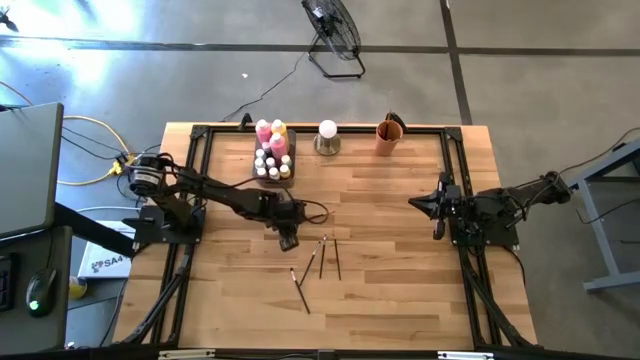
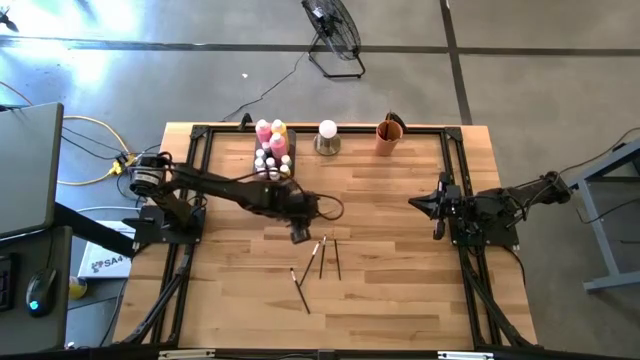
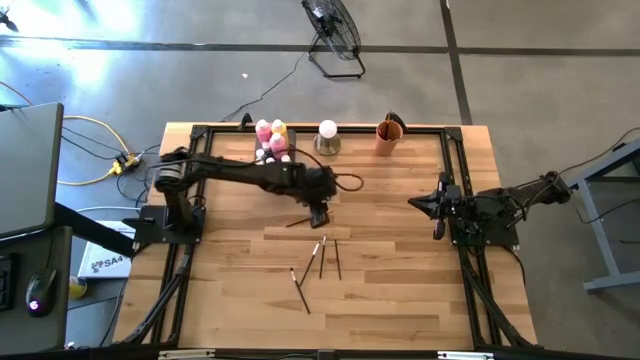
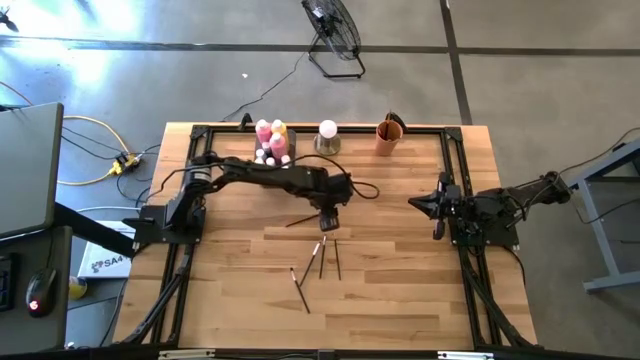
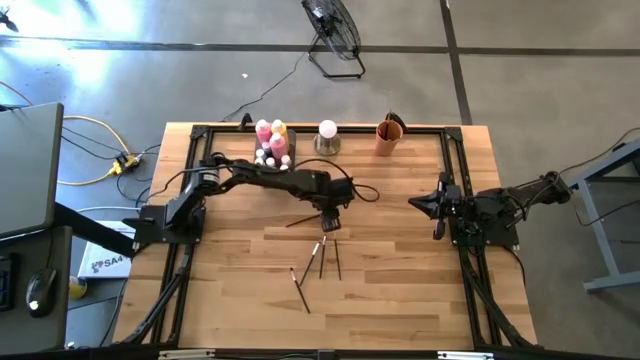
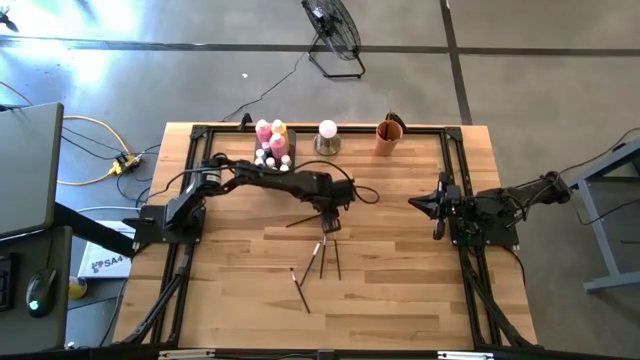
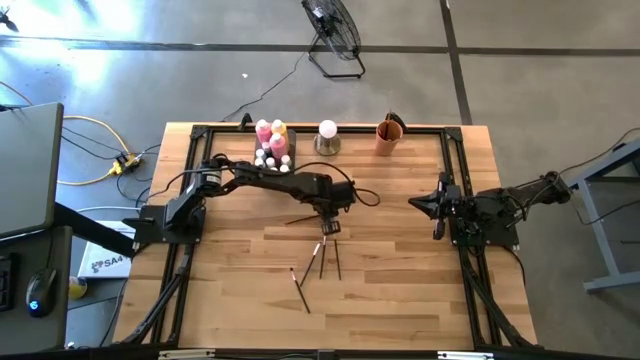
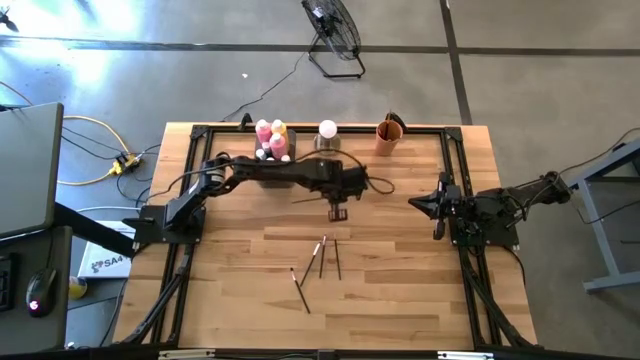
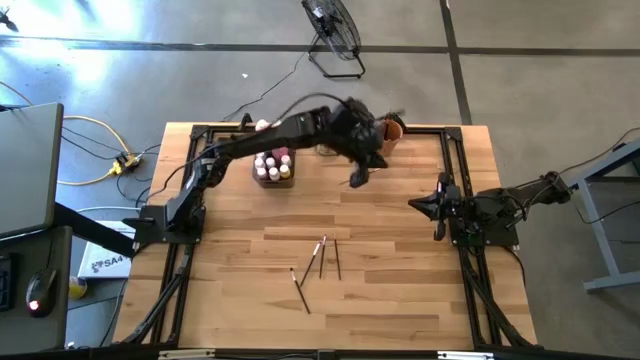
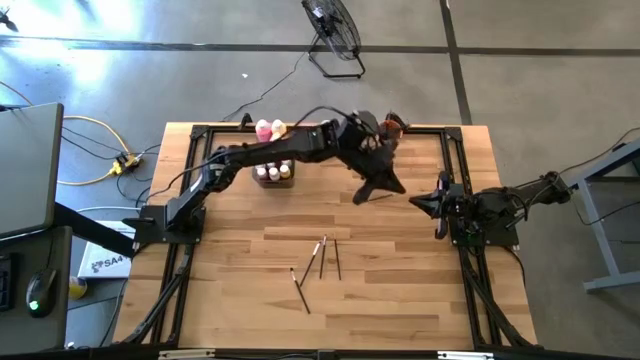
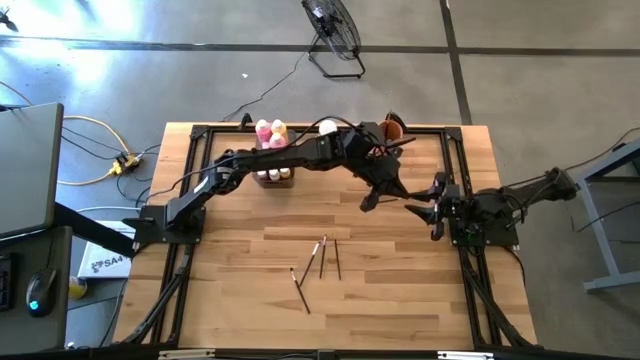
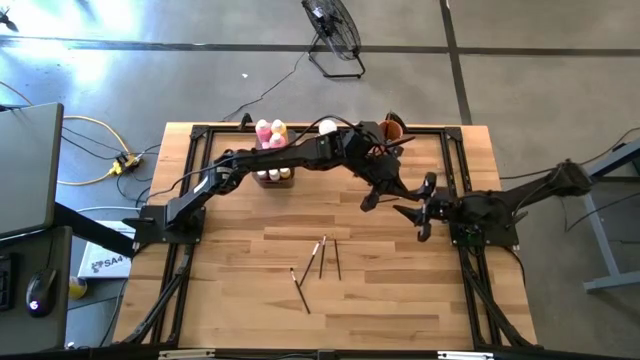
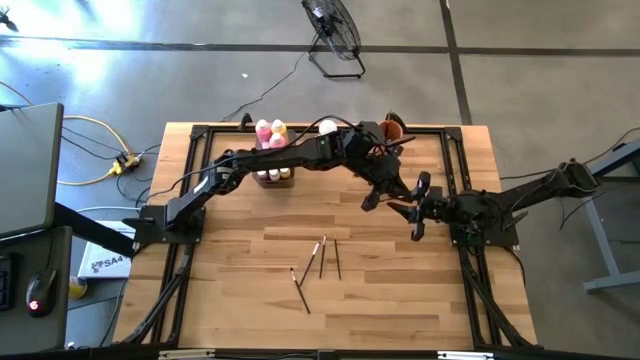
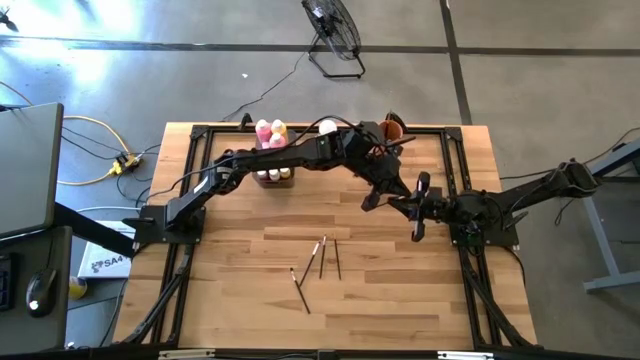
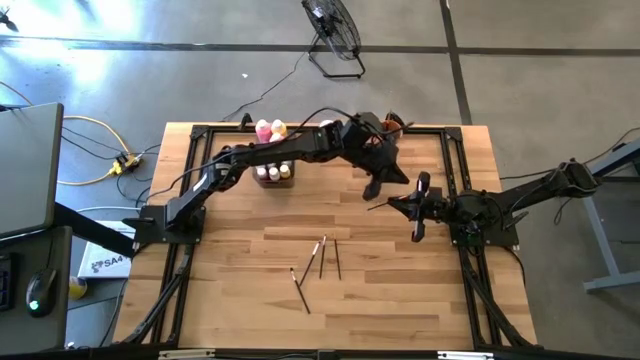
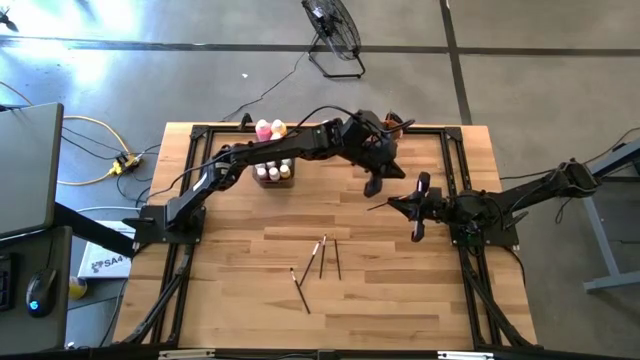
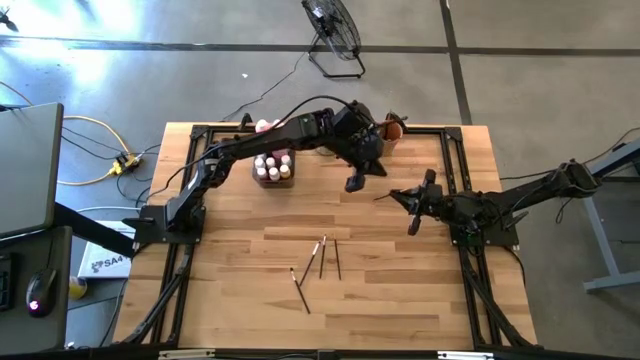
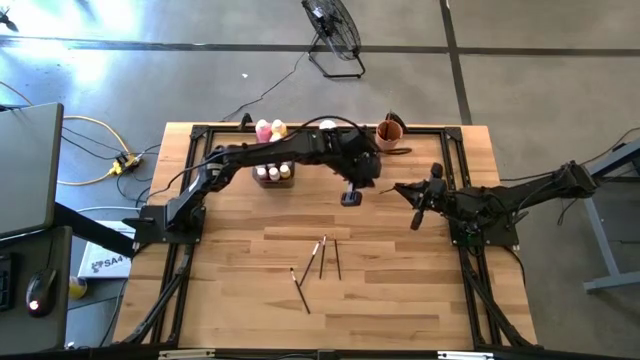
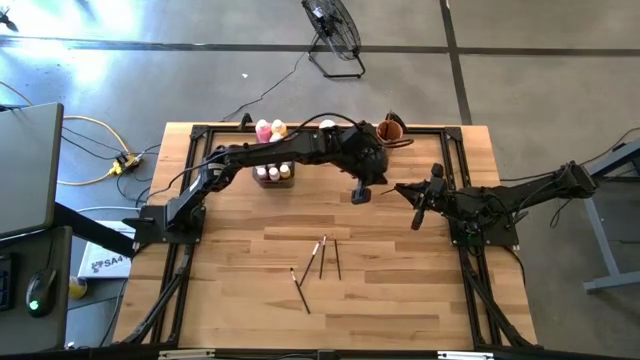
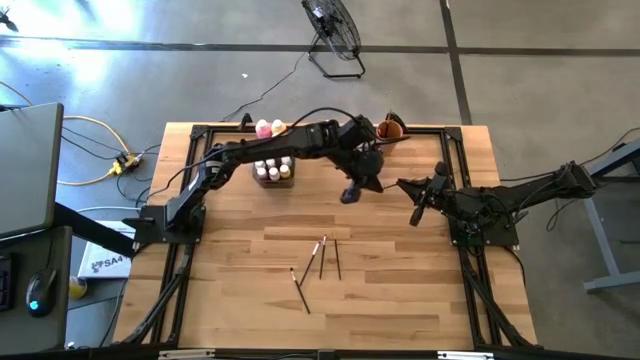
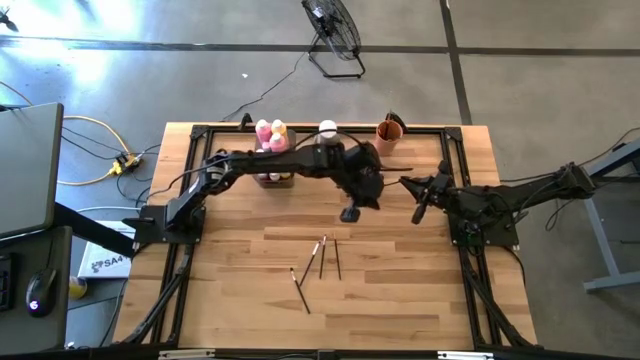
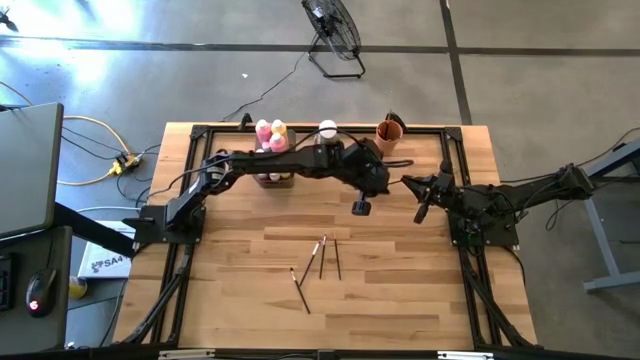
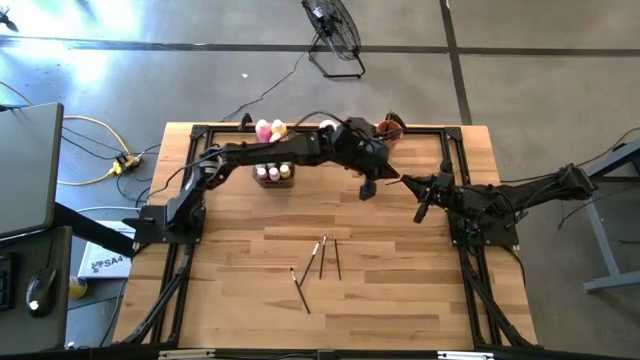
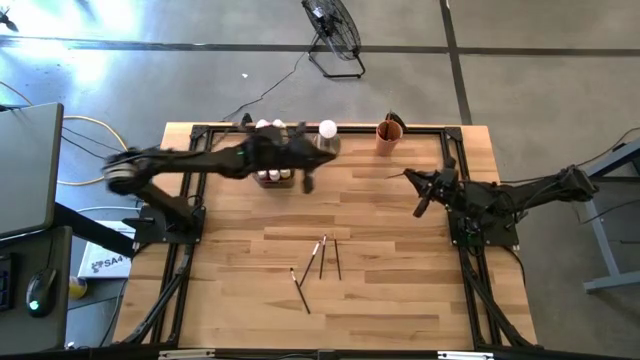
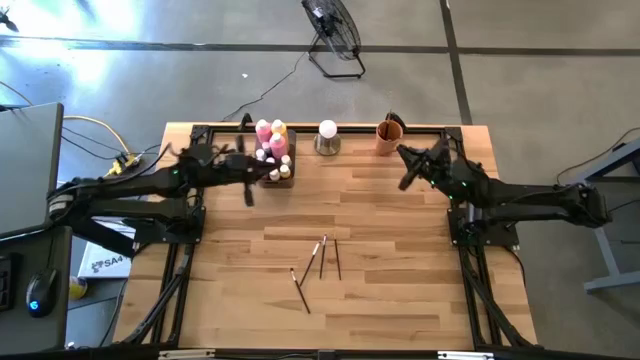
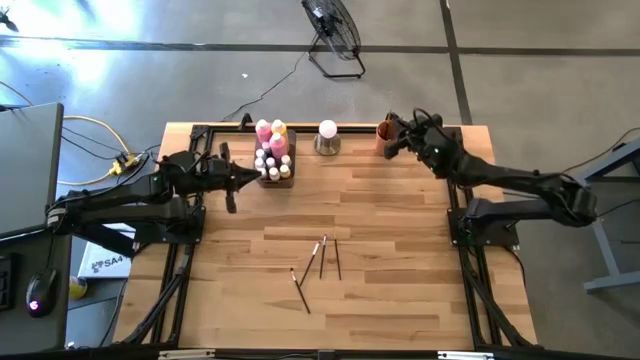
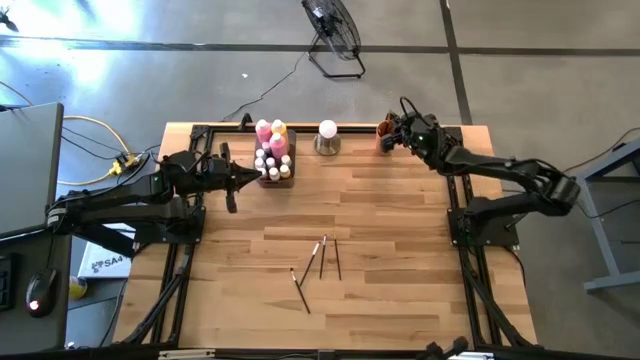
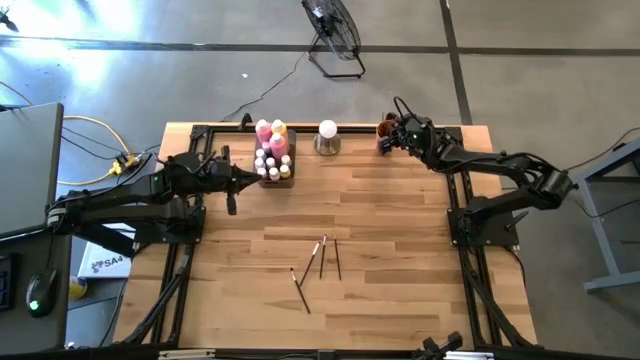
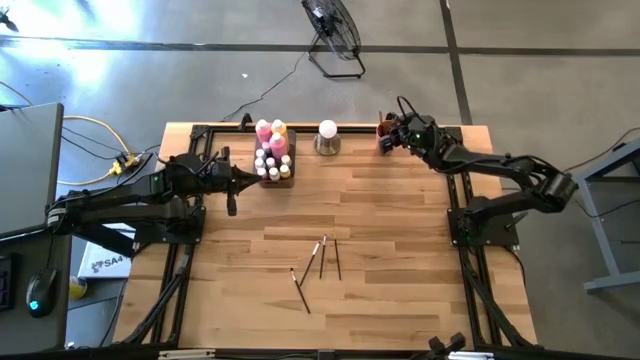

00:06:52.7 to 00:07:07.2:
Task: Pick & Place Paint Supplies
Put the orange paintbrush into the orange cup

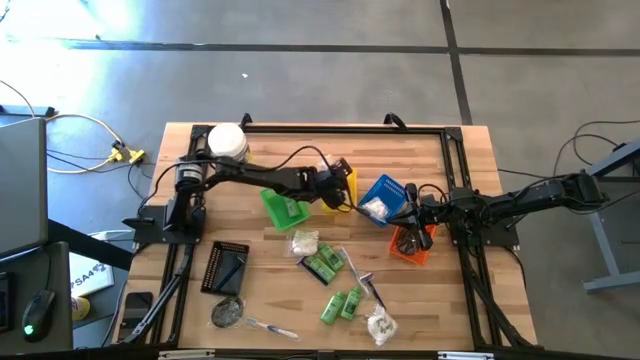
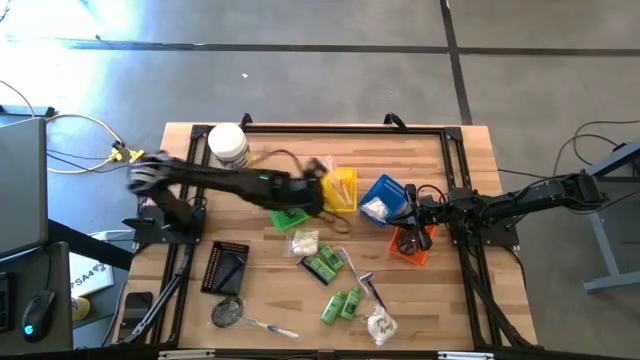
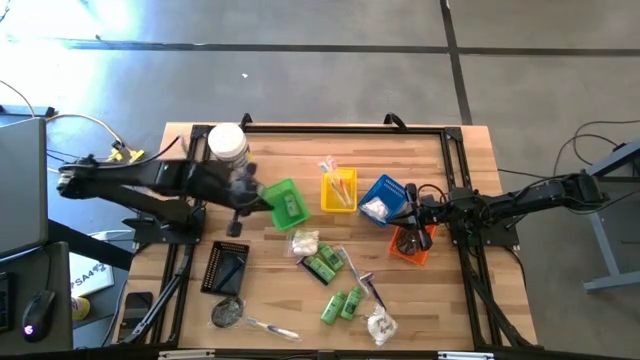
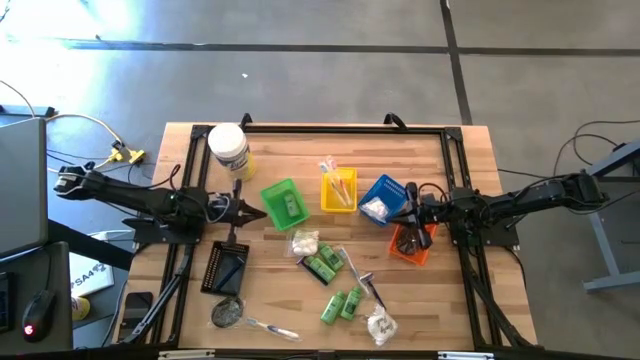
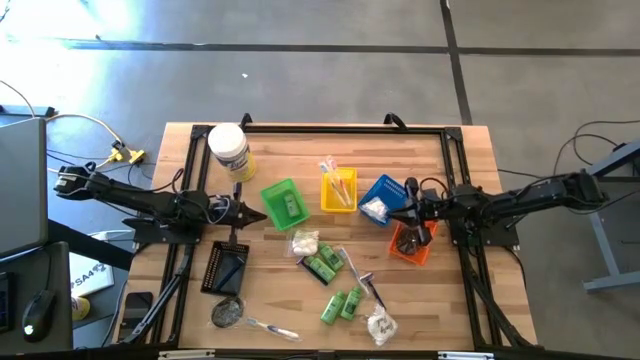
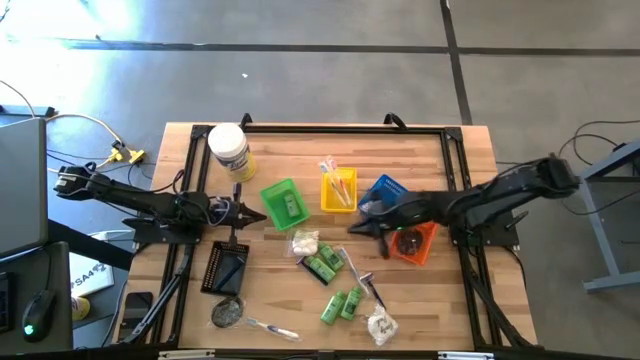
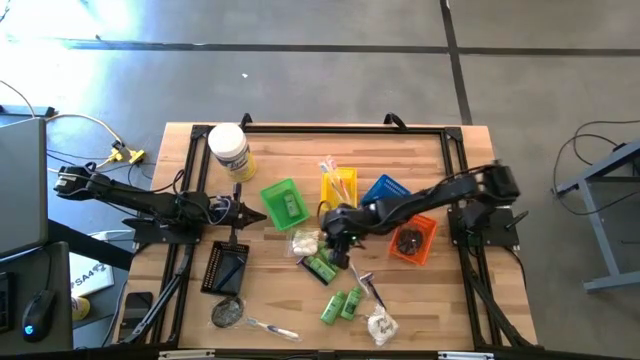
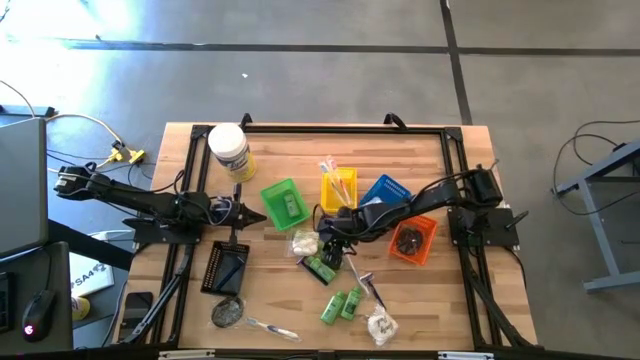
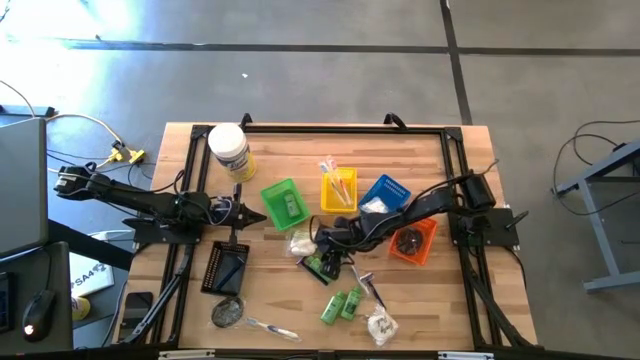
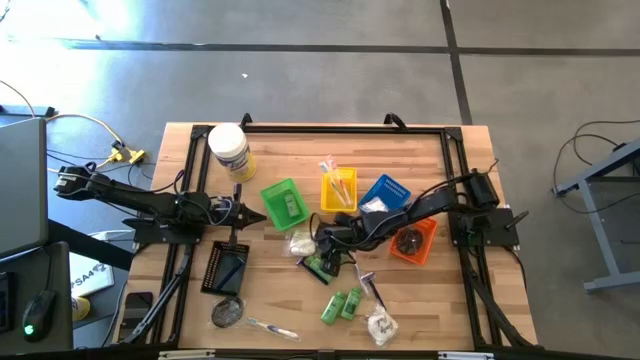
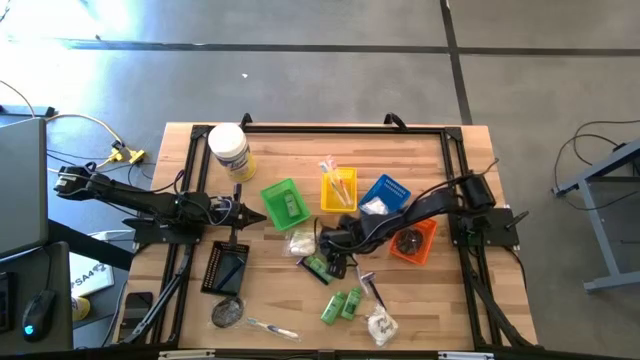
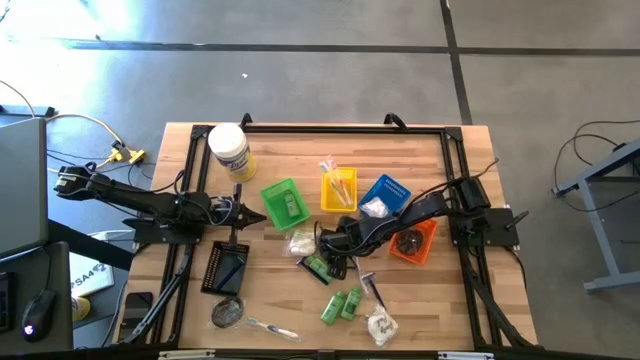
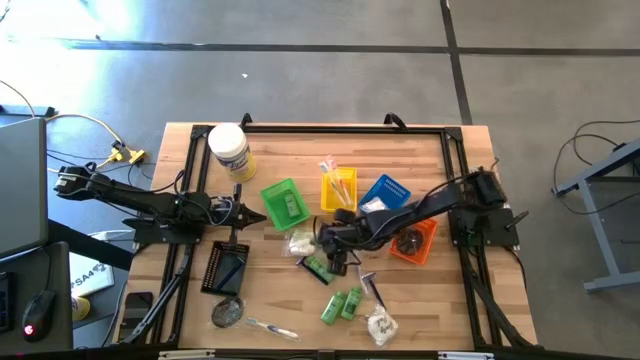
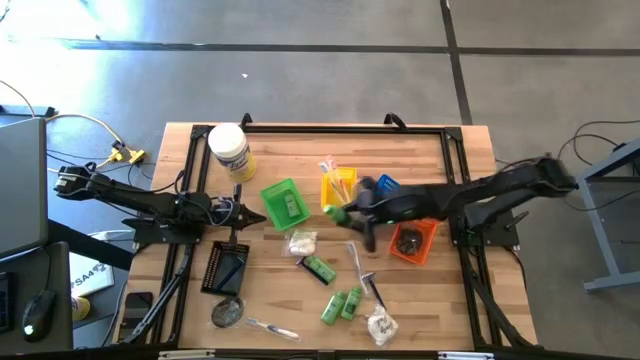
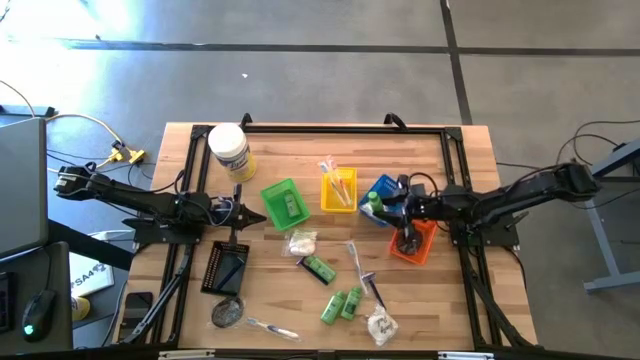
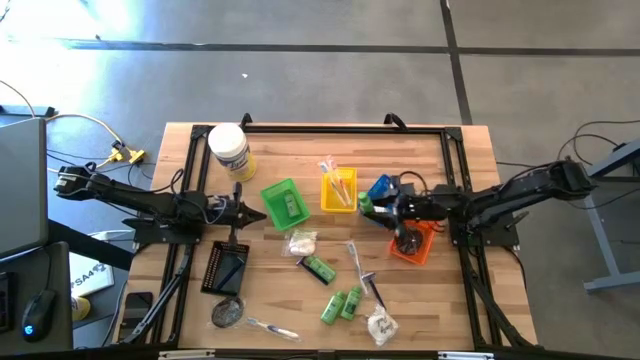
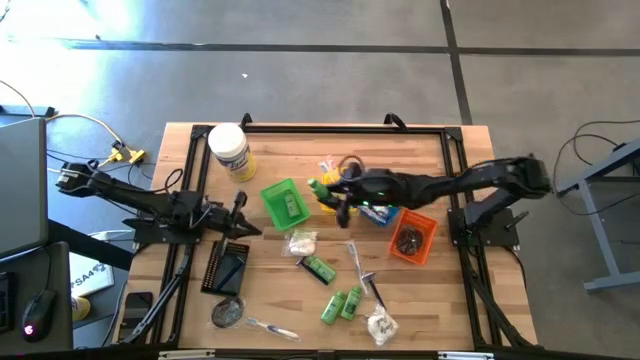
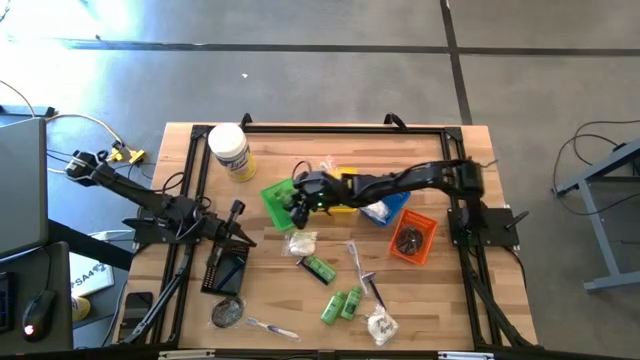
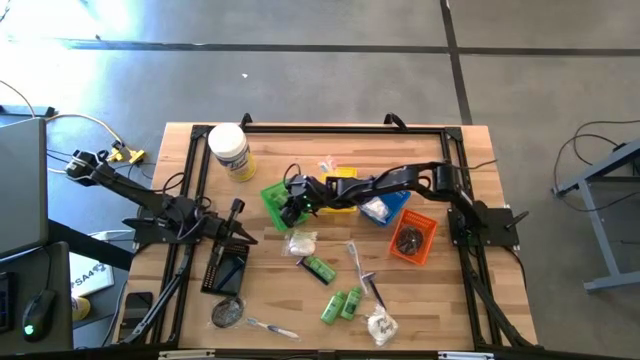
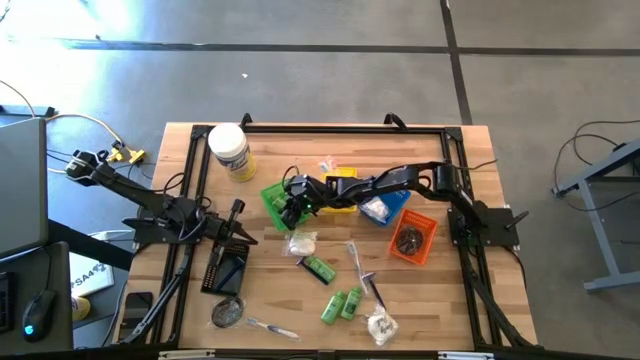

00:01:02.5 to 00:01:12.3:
Task: Pick & Place Travel size toiletries
Put the shampoo into the green bin
